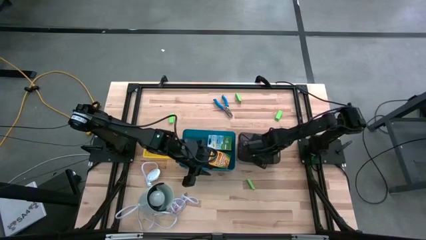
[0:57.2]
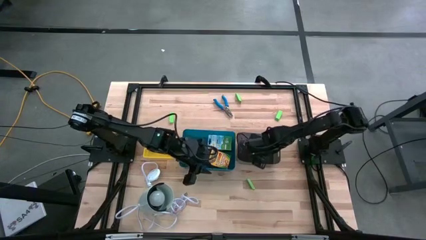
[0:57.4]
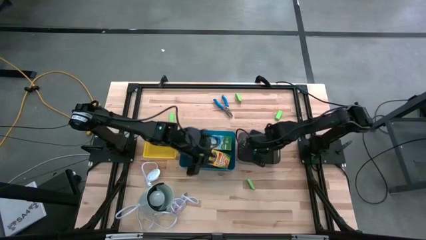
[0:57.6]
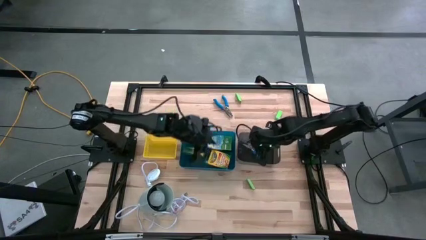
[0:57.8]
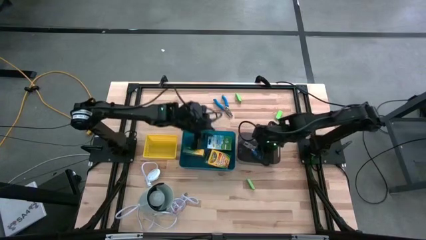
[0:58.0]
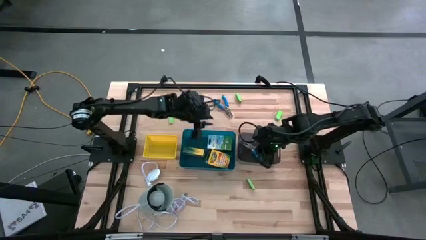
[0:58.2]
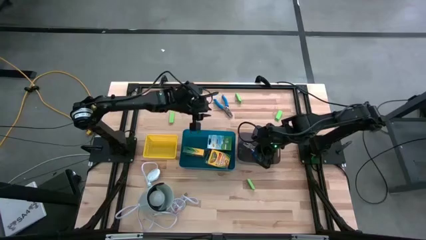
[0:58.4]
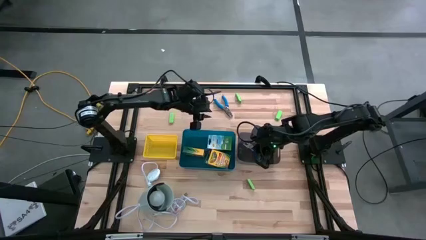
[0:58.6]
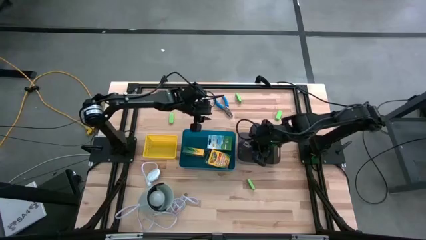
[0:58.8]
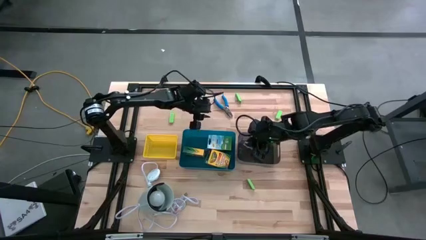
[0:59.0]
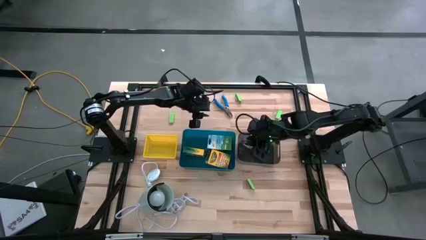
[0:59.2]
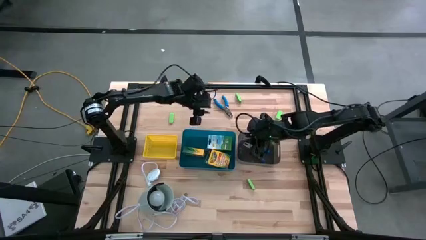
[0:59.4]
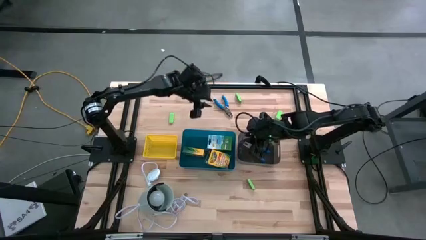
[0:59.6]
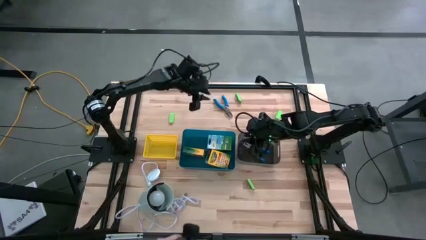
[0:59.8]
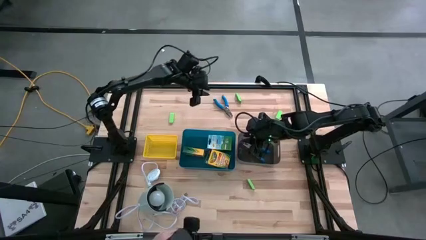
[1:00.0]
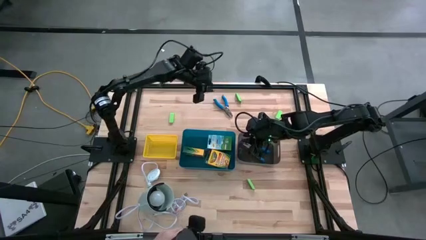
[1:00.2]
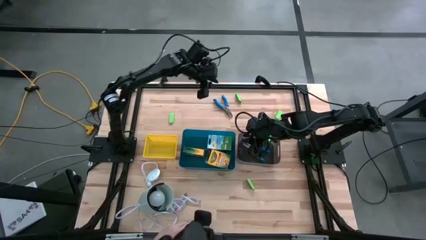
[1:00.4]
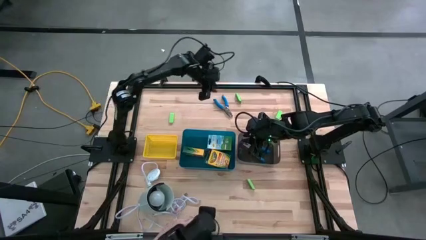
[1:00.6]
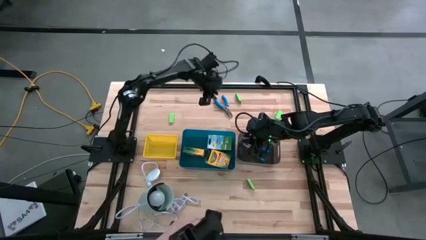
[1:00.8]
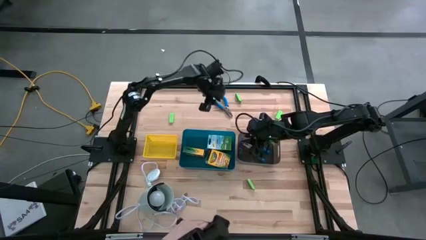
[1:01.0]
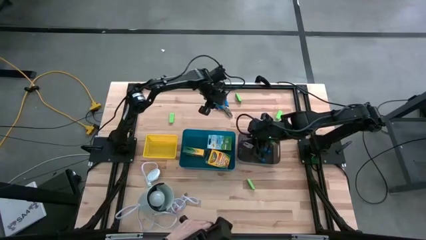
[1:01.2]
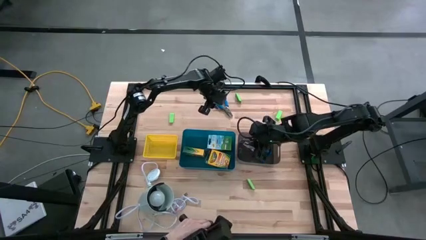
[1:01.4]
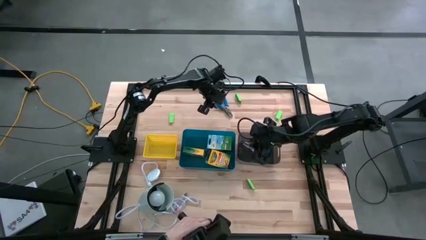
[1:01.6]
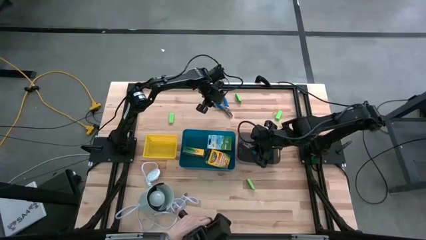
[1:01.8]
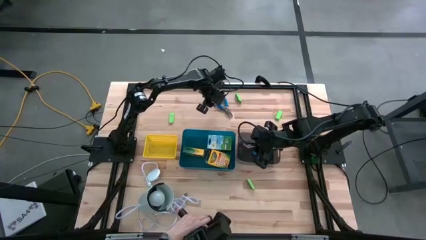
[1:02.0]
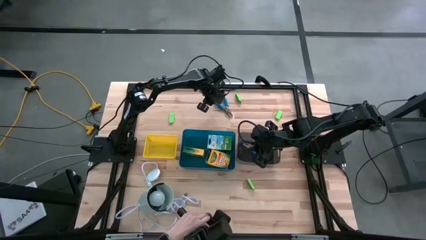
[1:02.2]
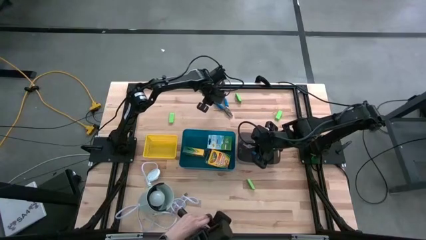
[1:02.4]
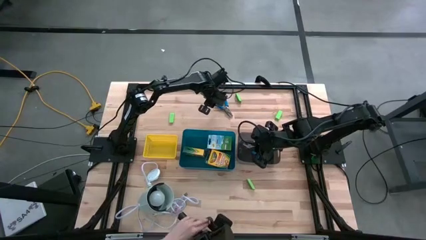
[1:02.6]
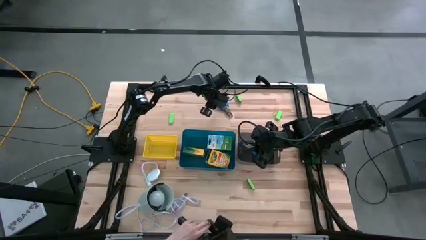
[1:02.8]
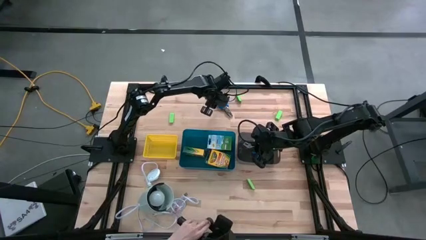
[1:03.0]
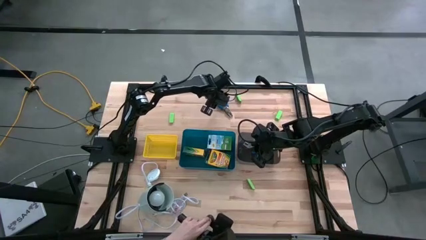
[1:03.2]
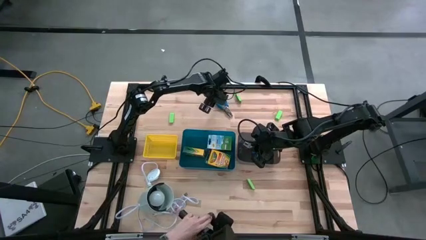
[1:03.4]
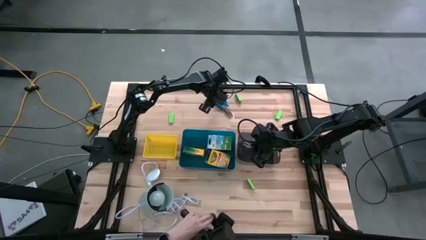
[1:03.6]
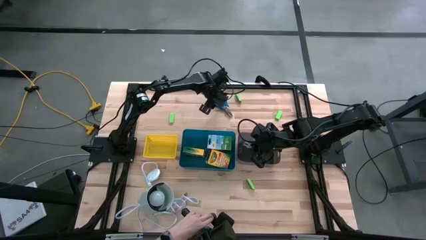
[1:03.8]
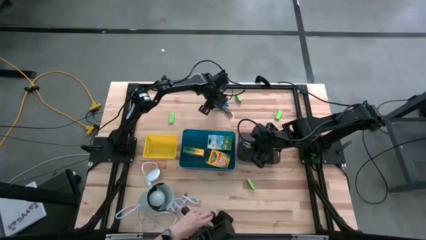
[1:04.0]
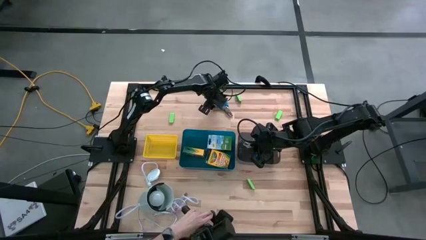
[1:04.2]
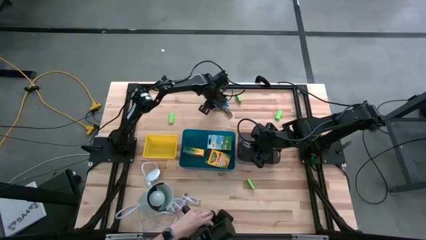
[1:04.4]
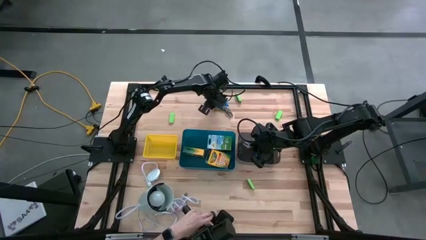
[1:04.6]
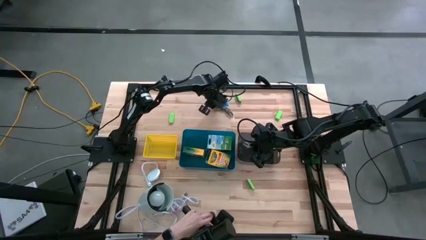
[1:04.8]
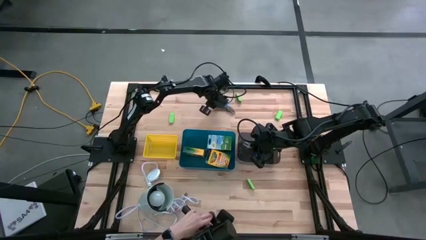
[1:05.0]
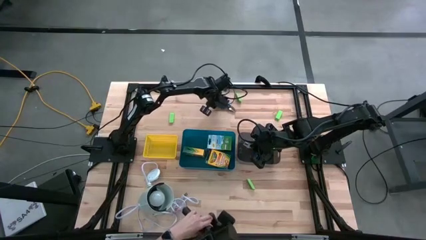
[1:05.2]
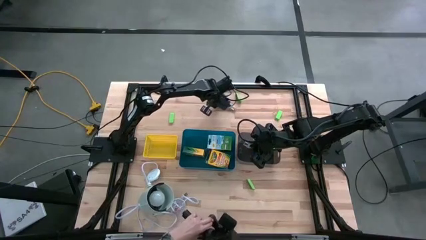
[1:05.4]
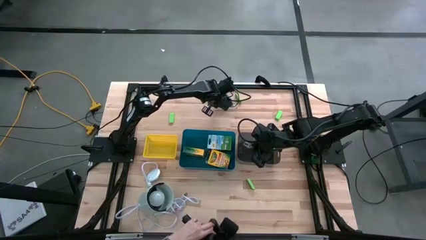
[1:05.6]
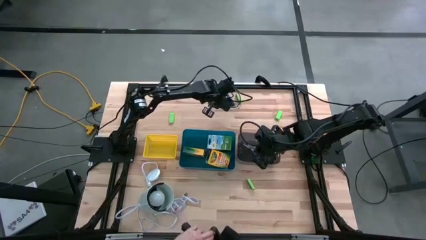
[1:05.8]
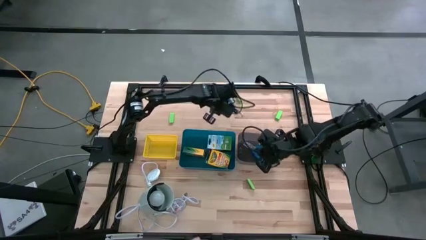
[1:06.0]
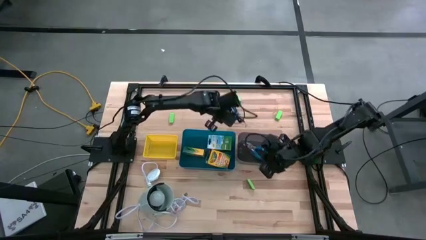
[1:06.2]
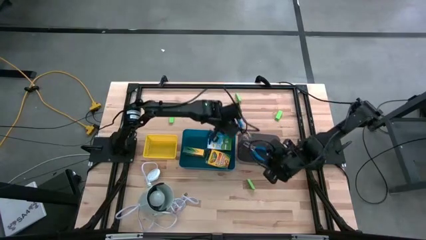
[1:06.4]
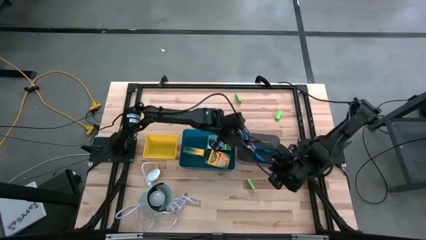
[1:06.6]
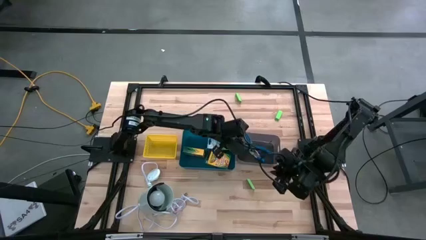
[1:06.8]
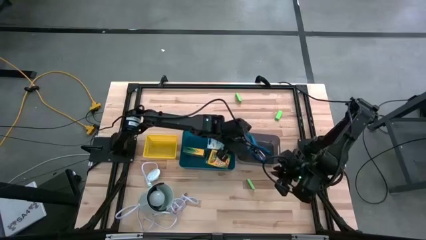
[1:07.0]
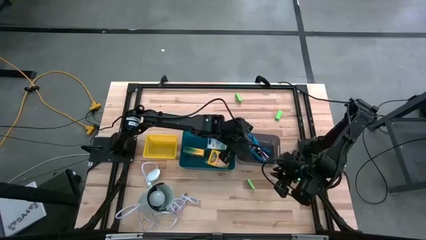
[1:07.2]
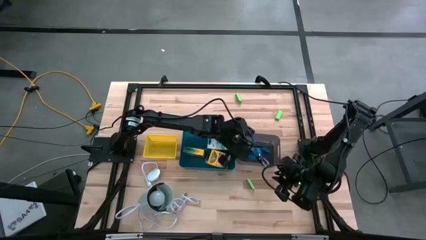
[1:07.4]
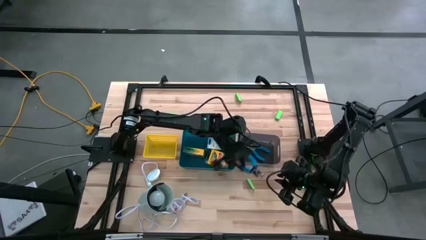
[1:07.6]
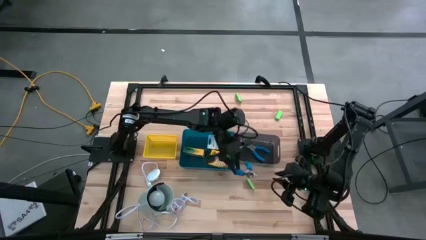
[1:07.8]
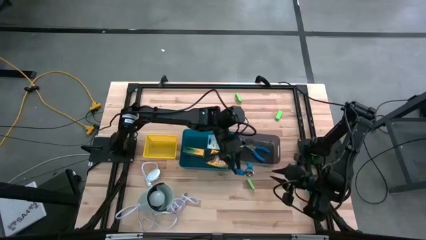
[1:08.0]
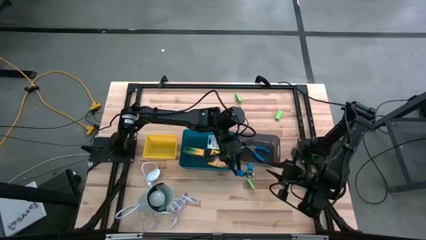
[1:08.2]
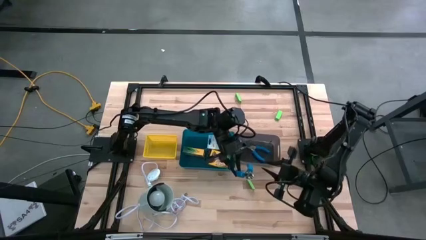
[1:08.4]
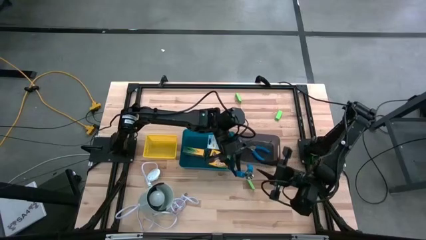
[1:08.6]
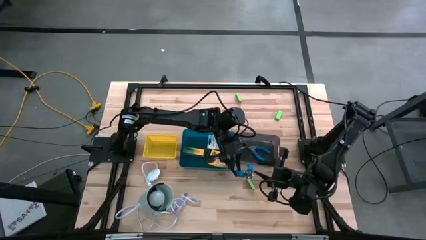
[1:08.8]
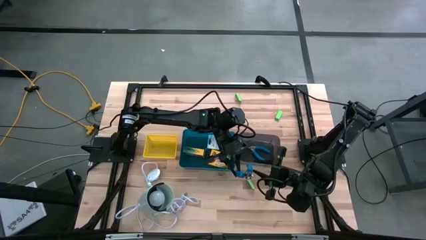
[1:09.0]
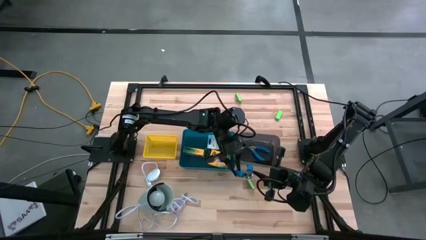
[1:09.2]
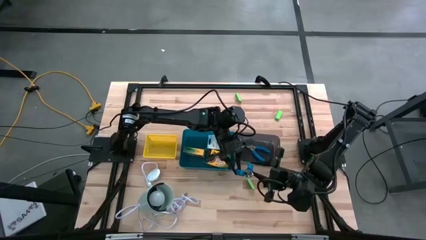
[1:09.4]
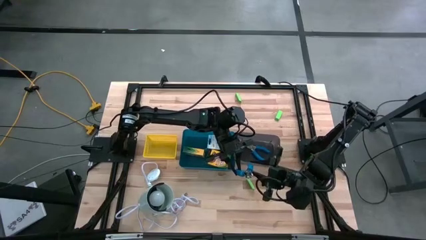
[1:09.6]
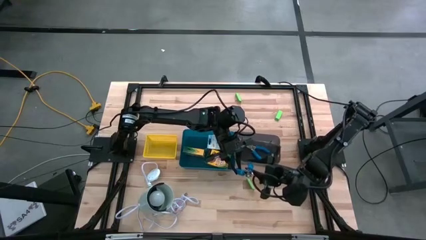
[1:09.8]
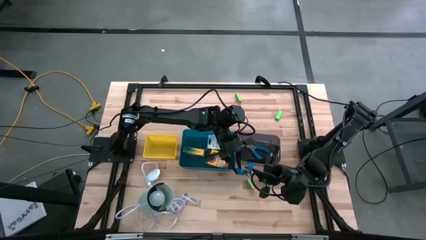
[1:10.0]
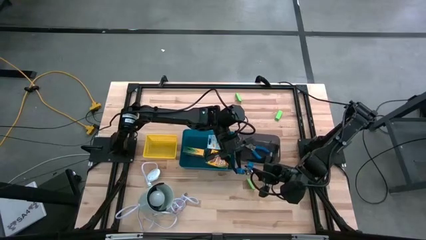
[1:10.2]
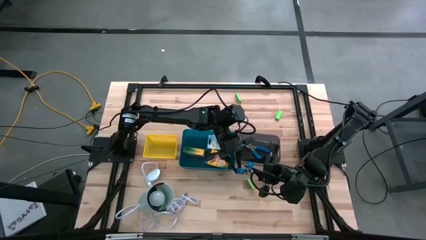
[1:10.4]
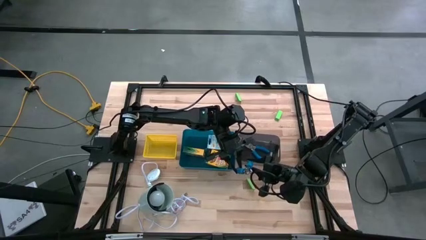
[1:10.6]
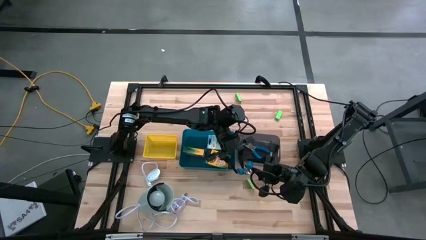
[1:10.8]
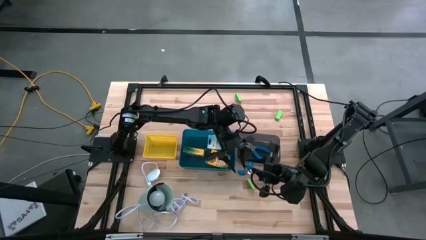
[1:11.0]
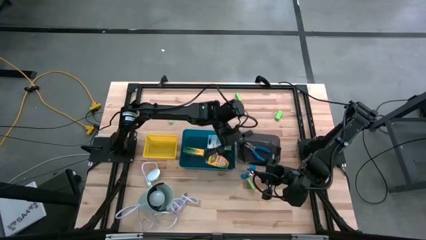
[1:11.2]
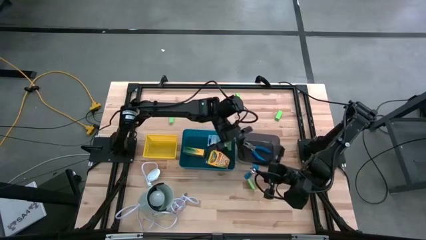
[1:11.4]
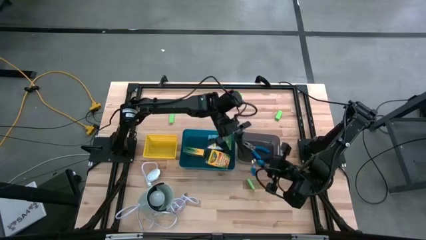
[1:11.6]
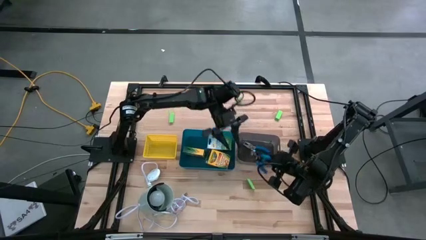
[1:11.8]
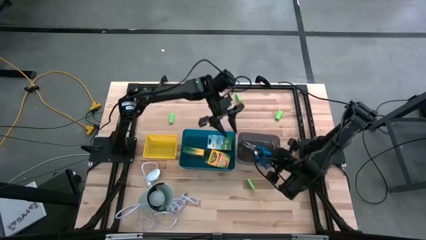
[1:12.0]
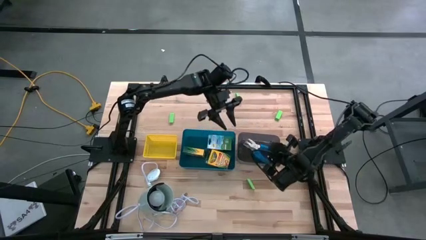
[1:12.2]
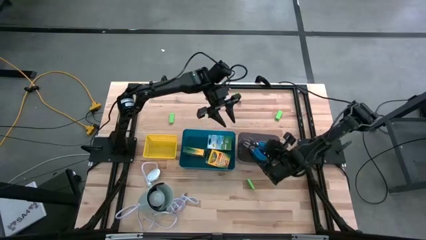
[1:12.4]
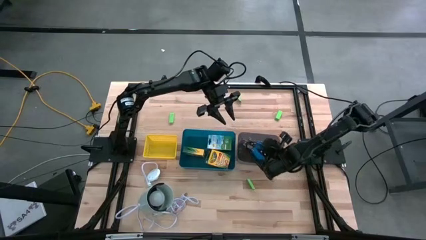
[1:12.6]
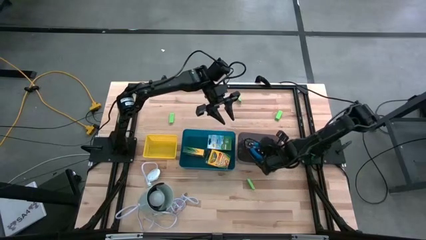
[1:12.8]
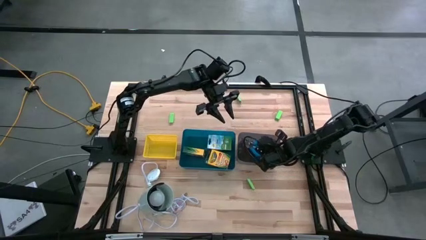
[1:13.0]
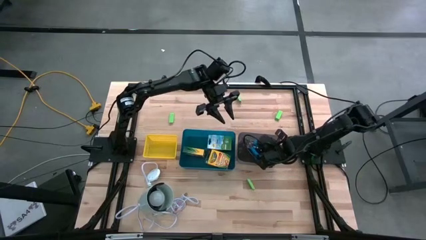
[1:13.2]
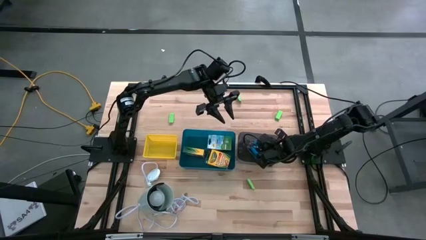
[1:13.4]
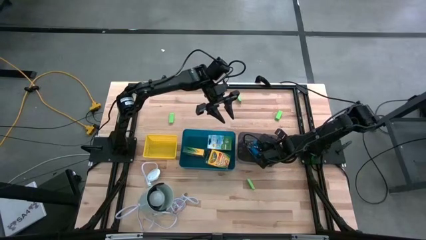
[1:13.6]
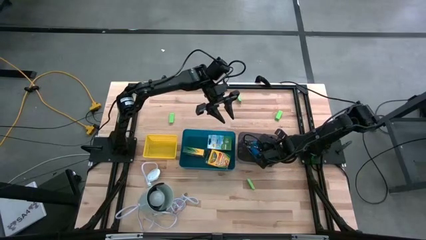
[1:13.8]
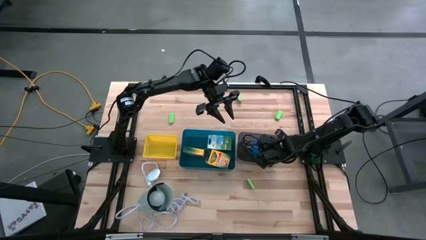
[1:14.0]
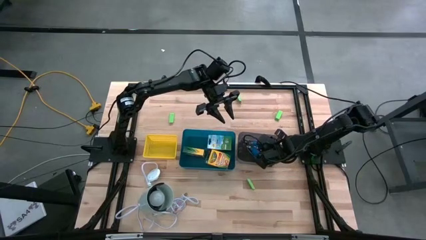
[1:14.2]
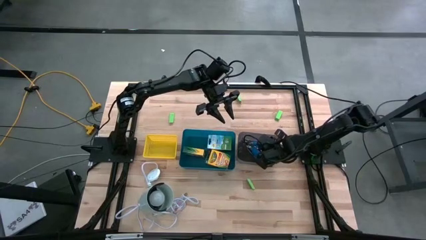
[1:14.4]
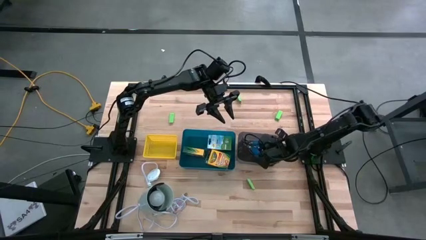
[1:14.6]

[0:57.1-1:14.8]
Task: Pick & Place School Supplies
Put the blue hole puncher into the black bin
